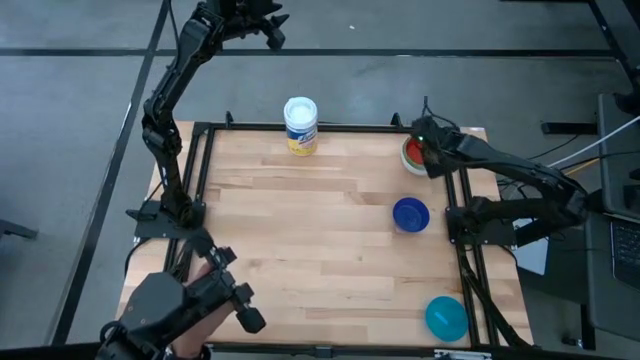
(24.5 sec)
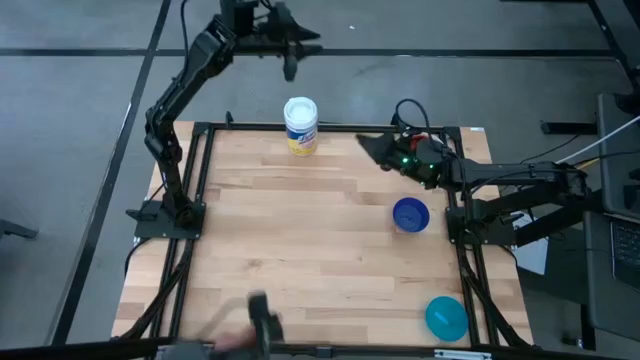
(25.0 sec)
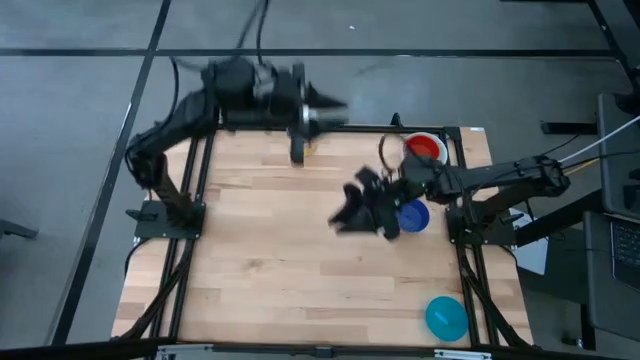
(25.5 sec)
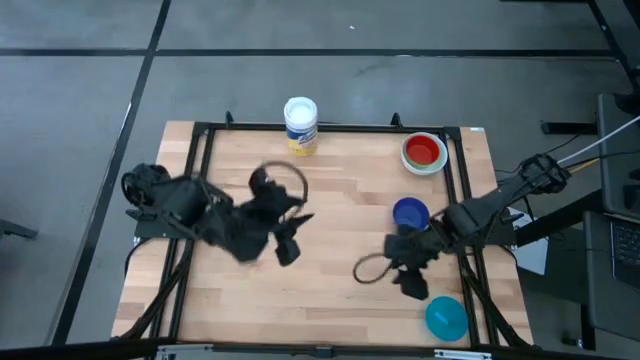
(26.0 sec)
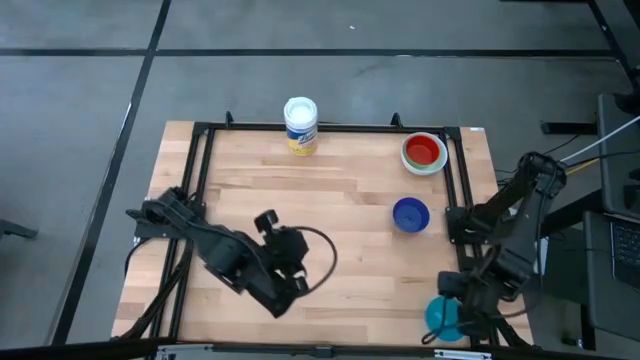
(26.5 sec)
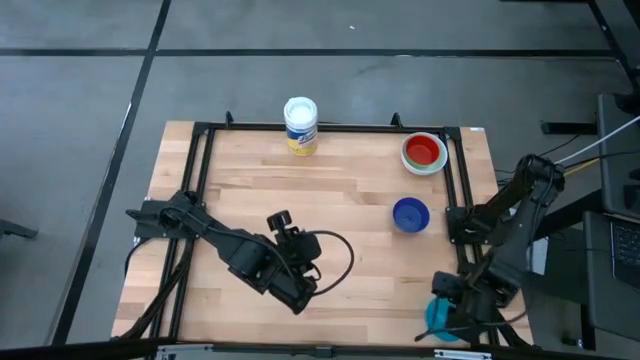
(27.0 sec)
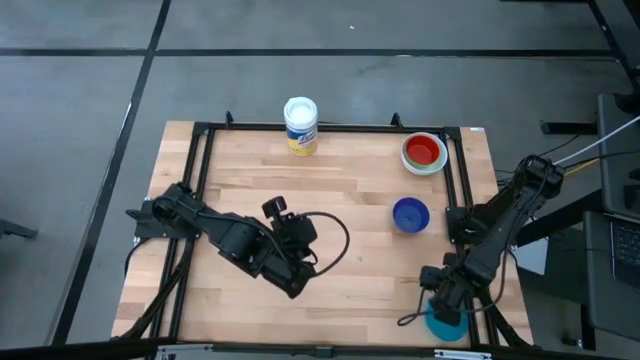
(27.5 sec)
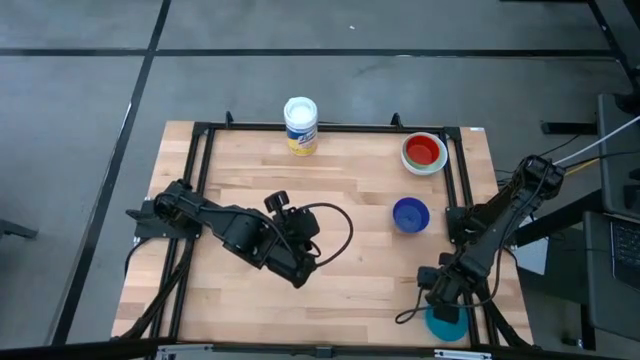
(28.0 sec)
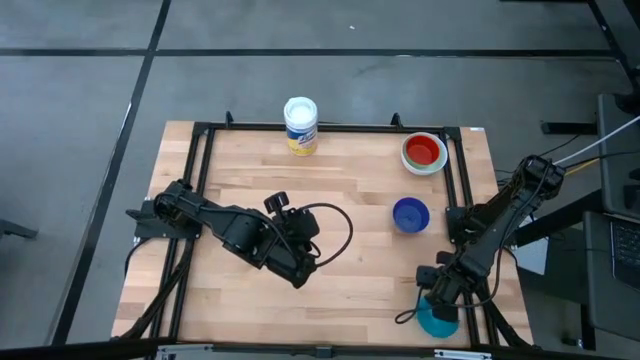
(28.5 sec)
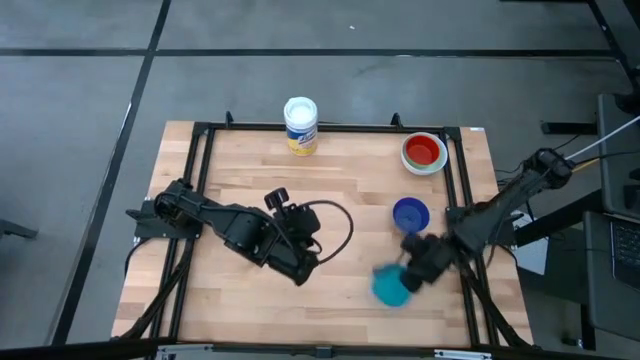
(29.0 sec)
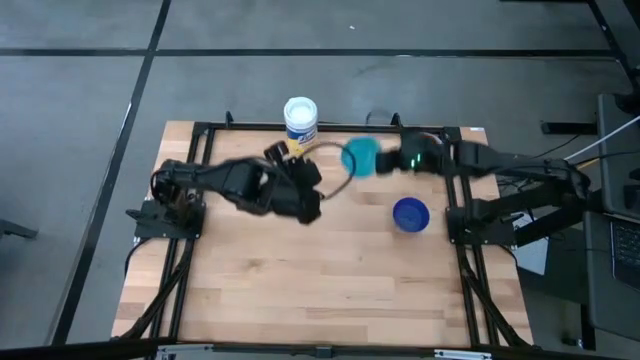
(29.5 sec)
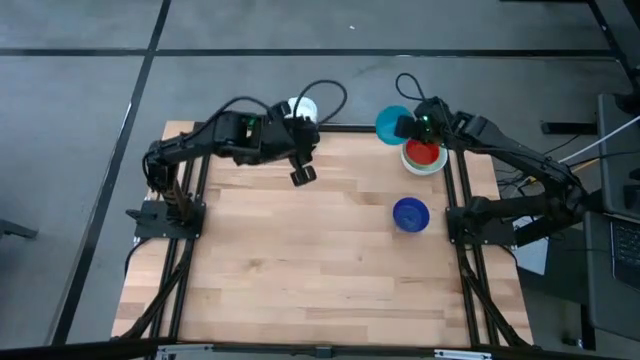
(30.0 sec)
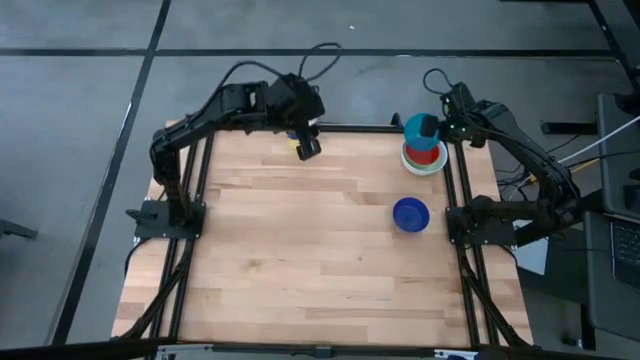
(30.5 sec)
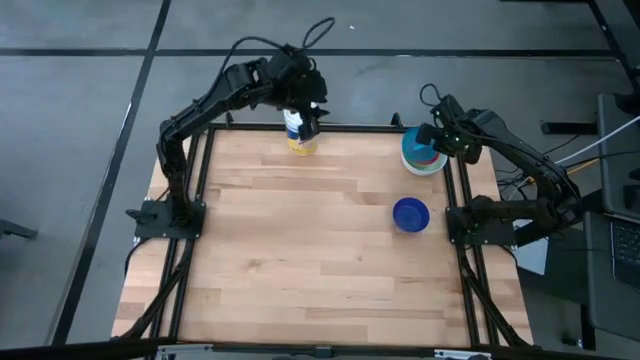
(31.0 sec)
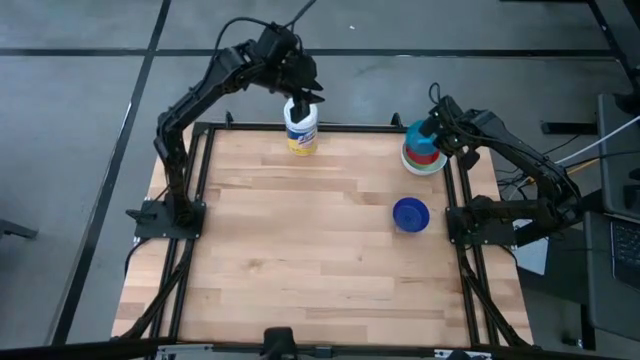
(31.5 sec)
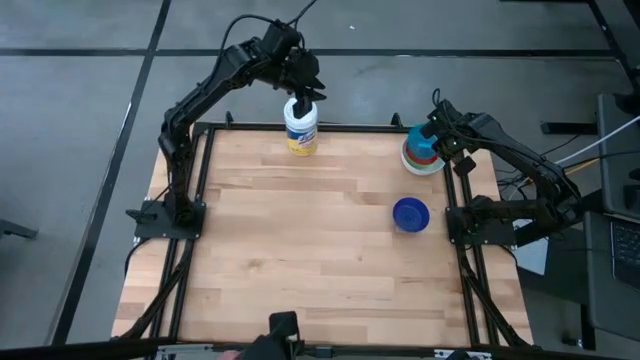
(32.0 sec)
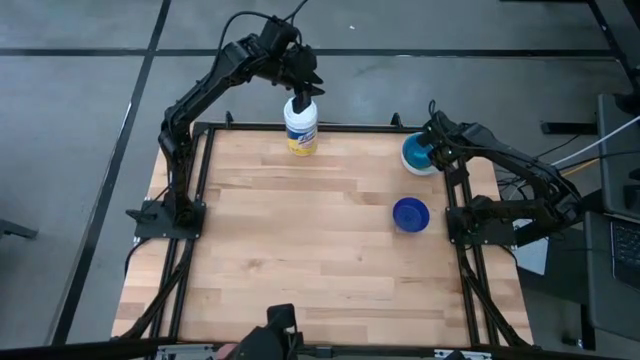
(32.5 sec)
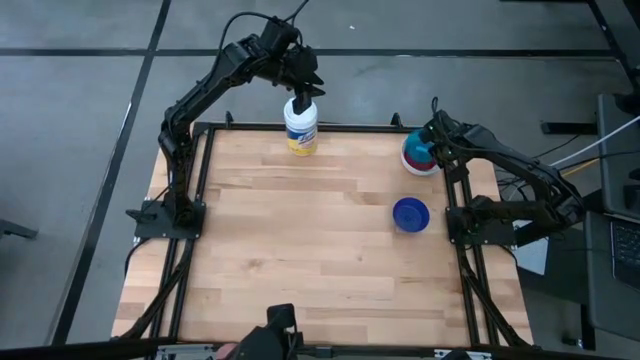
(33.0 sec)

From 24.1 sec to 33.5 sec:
Stack the light blue bowl on the red bowl

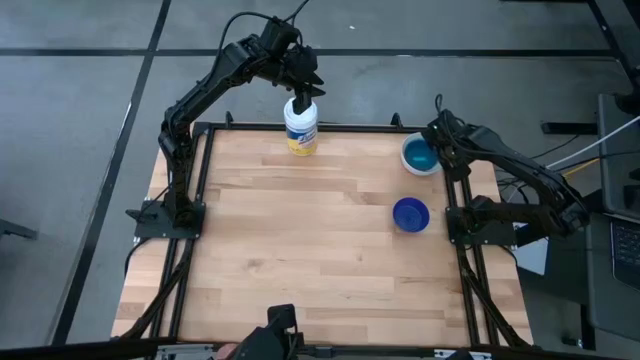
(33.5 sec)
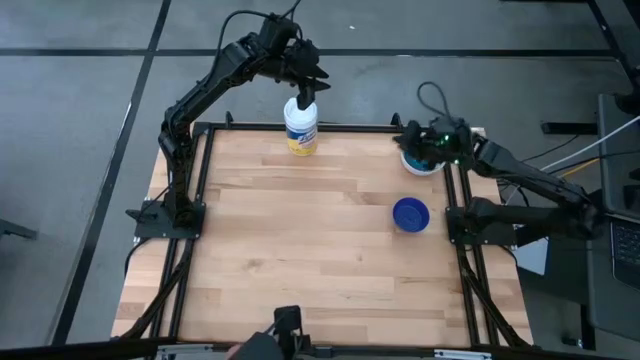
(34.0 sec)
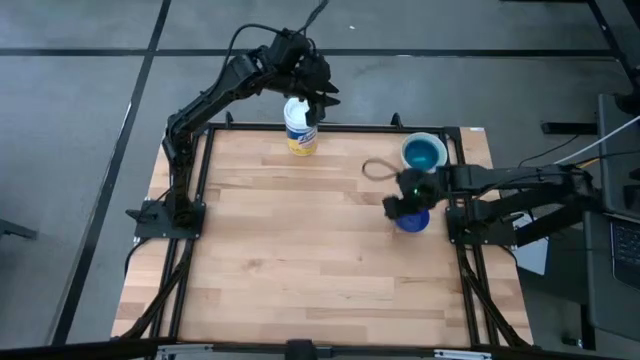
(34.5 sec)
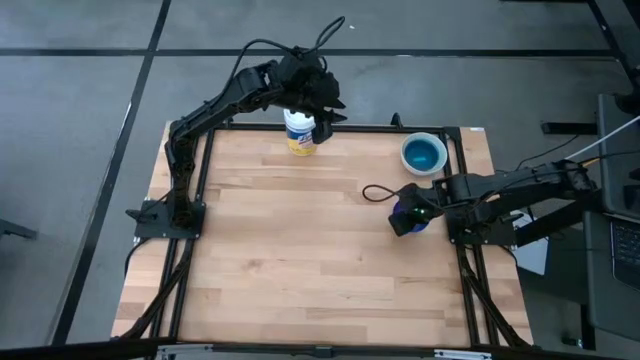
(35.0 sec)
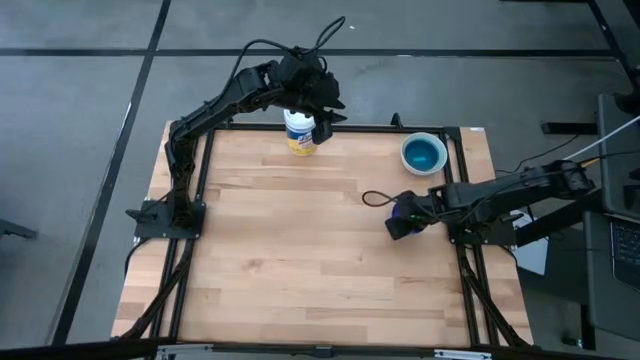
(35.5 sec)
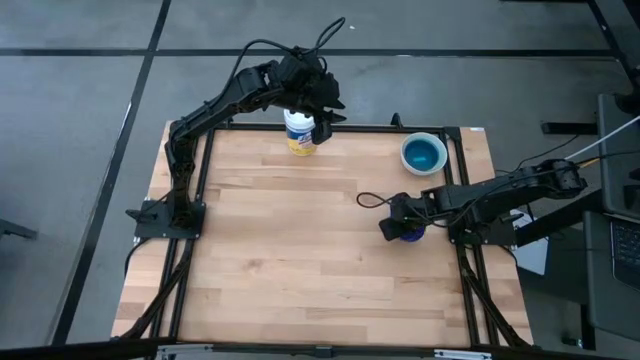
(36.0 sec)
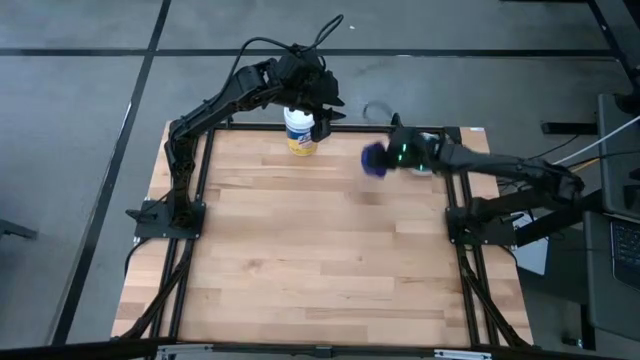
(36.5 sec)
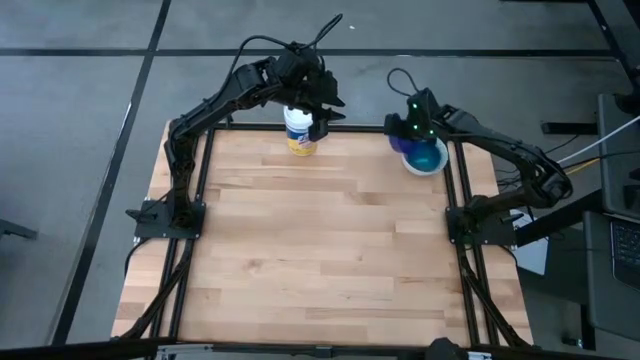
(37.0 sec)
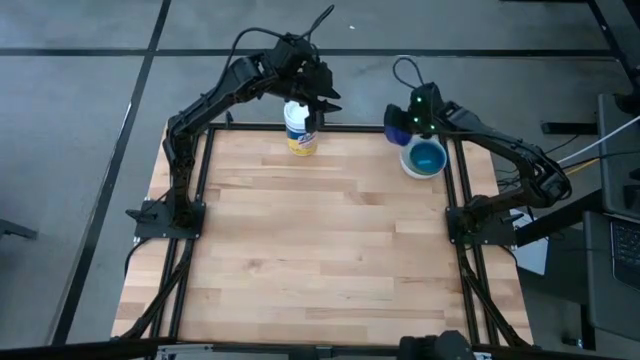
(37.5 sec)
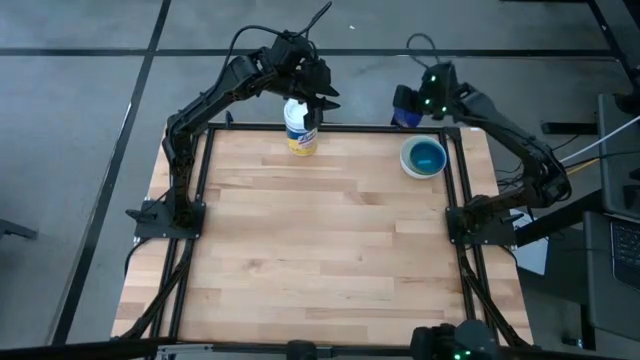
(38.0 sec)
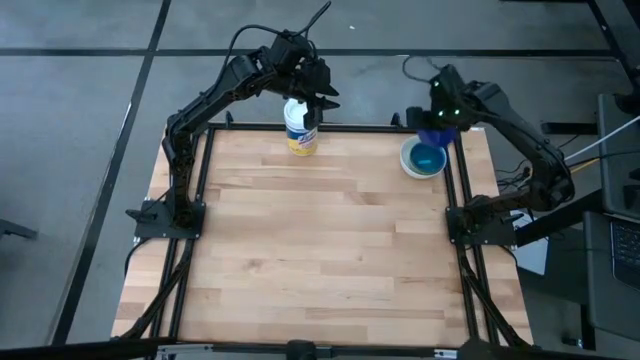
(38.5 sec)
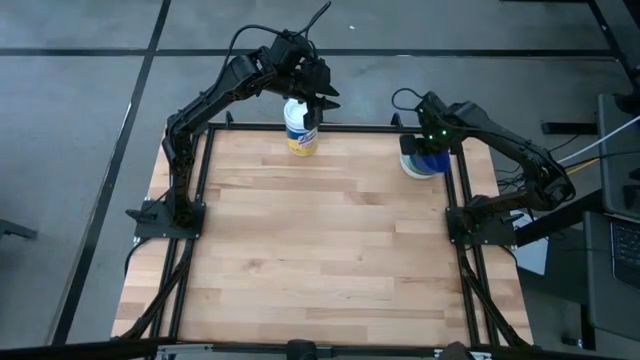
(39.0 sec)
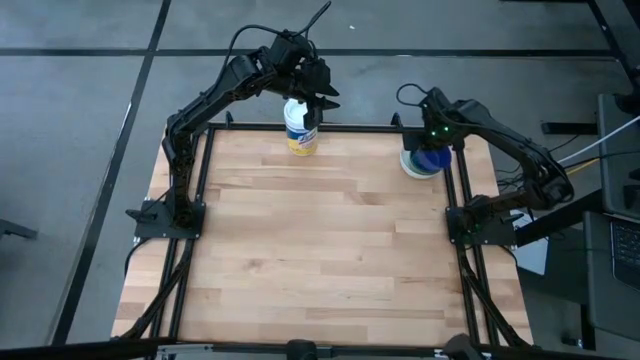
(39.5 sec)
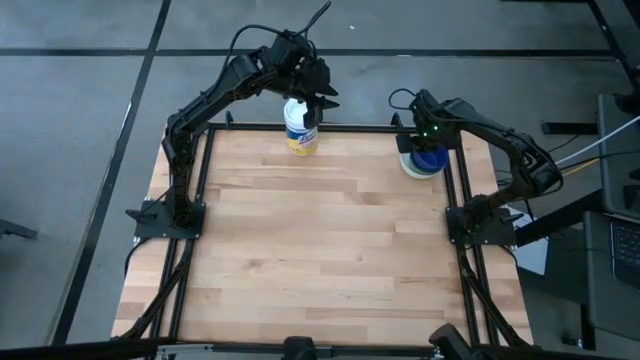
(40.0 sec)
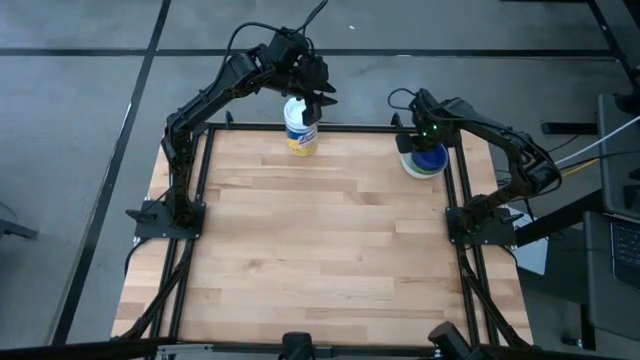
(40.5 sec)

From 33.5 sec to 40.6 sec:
Stack the blue bowl on the light blue bowl

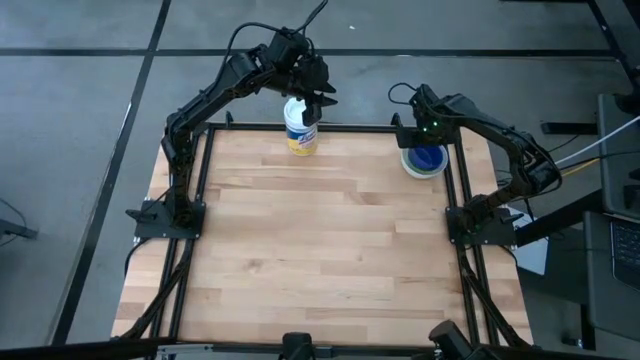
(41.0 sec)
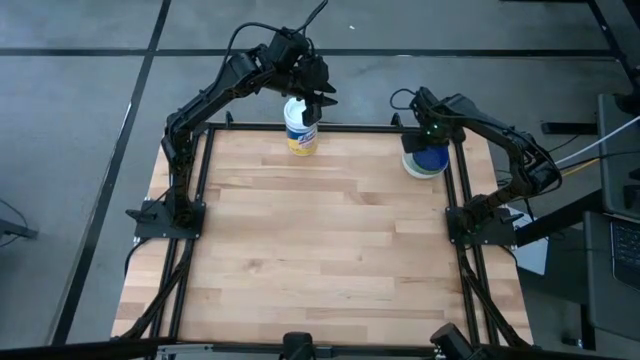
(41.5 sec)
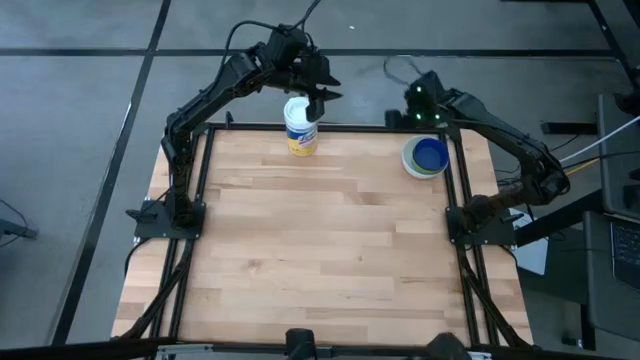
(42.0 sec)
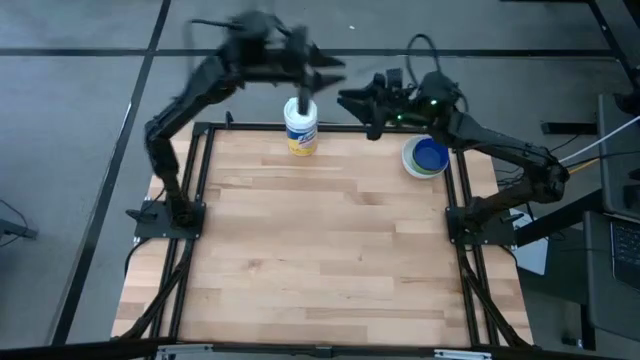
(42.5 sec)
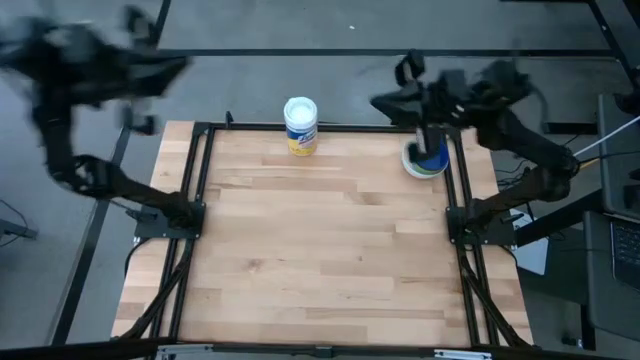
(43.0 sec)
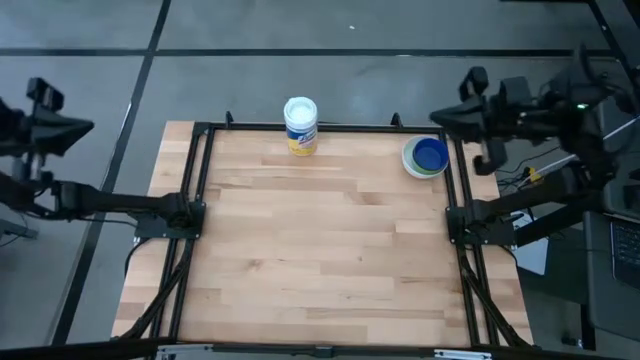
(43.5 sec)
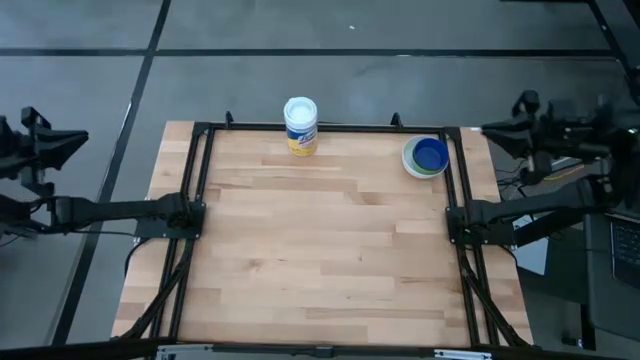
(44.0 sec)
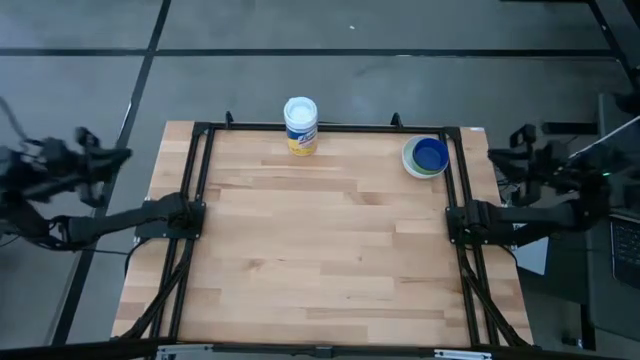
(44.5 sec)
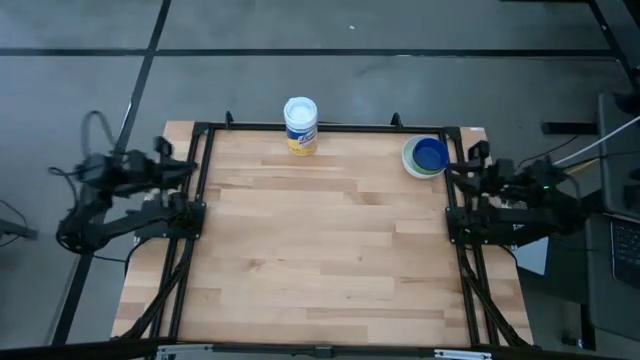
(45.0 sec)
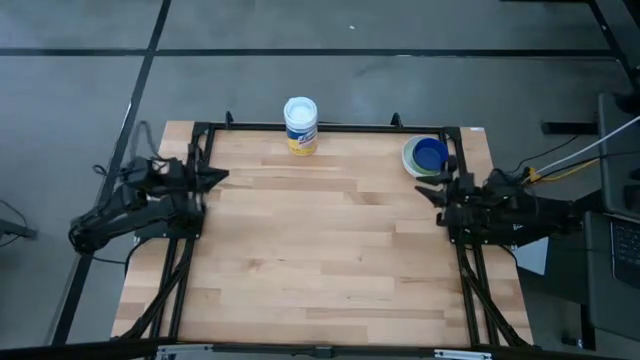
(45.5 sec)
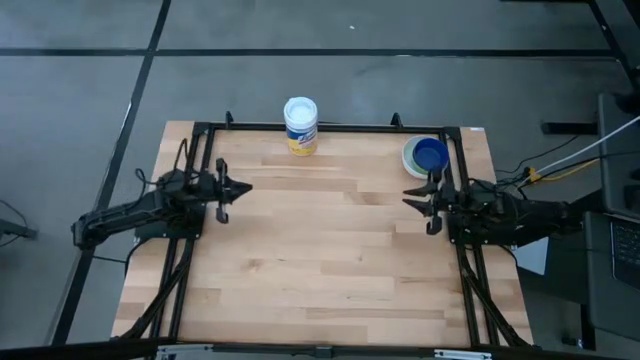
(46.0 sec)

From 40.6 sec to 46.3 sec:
Return to Home Position
